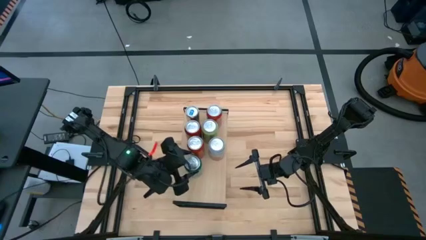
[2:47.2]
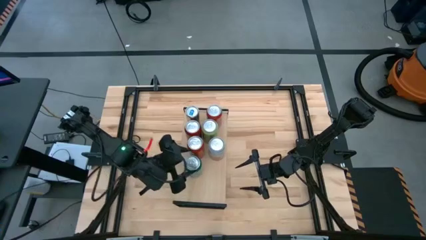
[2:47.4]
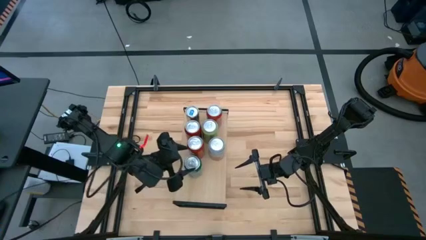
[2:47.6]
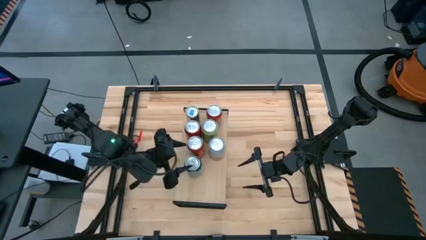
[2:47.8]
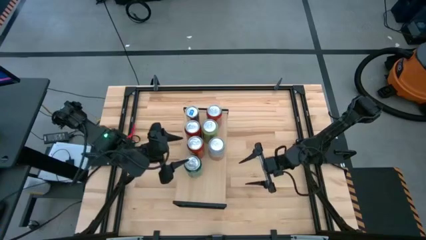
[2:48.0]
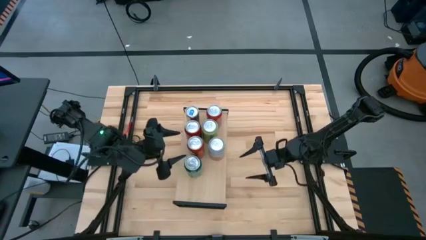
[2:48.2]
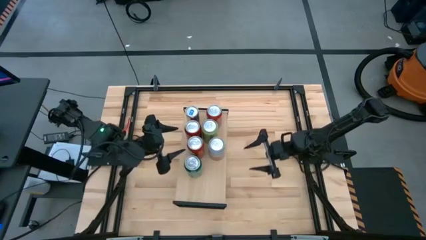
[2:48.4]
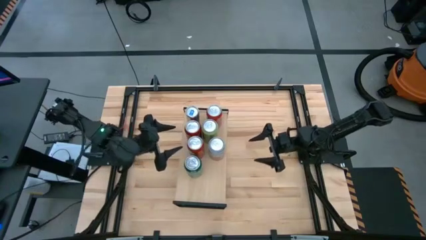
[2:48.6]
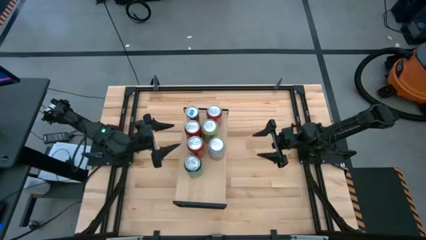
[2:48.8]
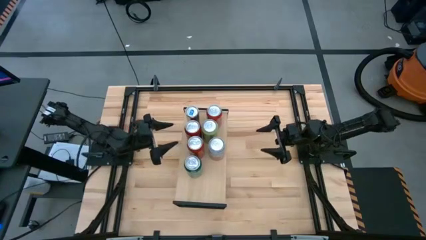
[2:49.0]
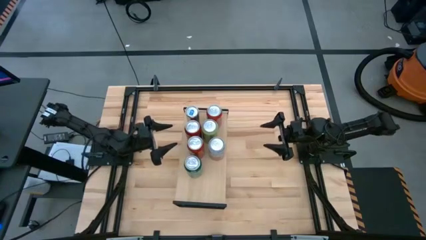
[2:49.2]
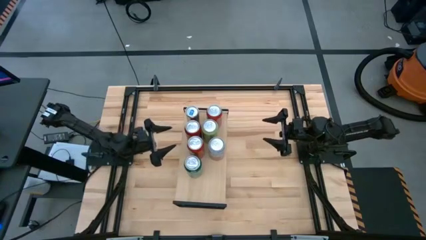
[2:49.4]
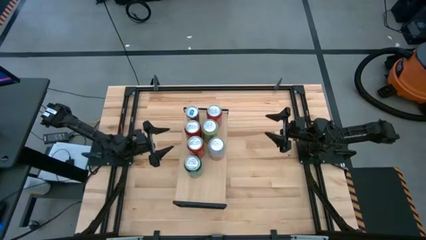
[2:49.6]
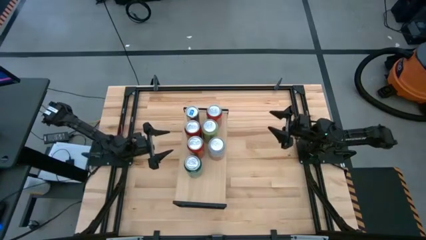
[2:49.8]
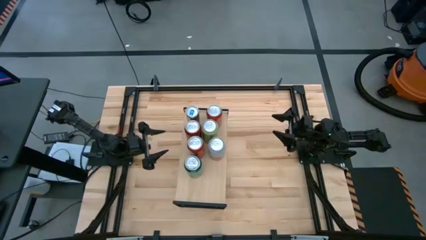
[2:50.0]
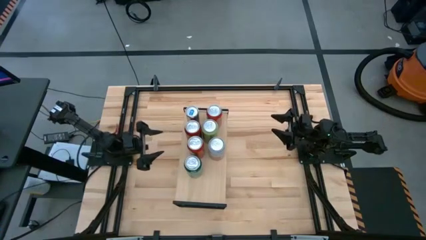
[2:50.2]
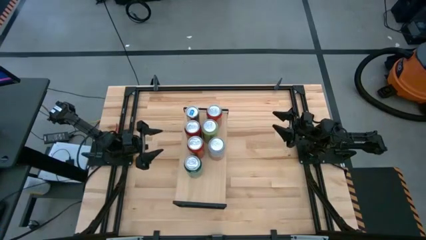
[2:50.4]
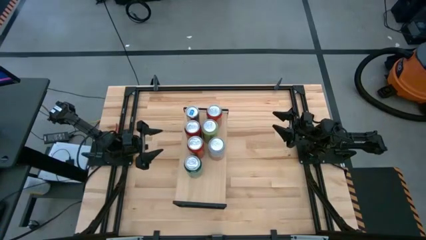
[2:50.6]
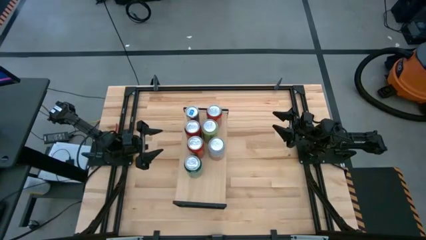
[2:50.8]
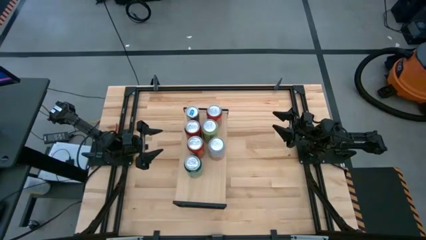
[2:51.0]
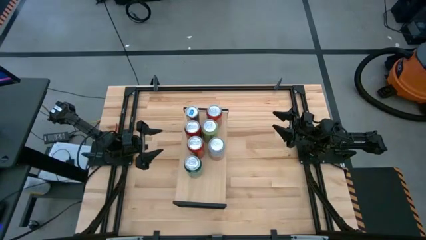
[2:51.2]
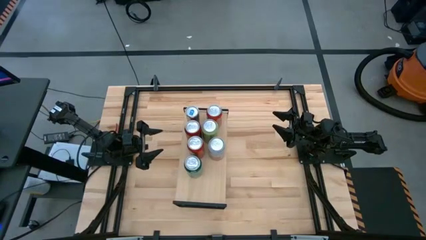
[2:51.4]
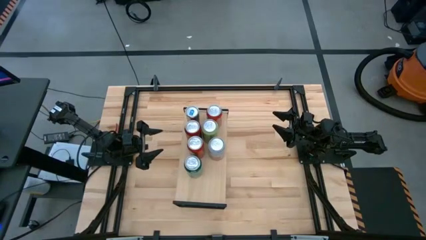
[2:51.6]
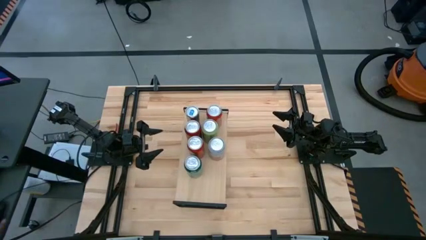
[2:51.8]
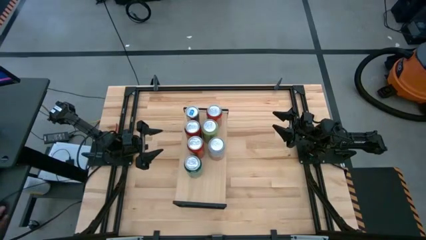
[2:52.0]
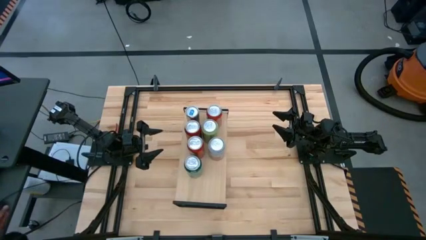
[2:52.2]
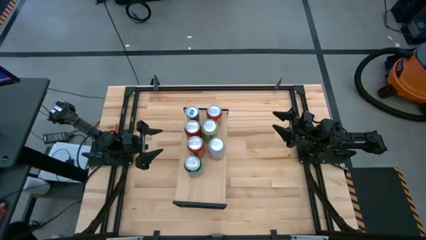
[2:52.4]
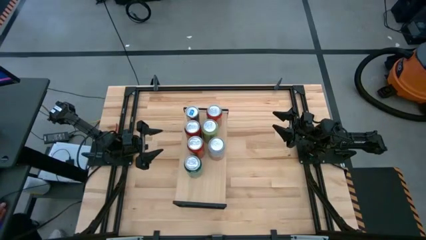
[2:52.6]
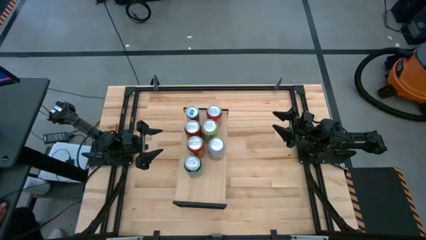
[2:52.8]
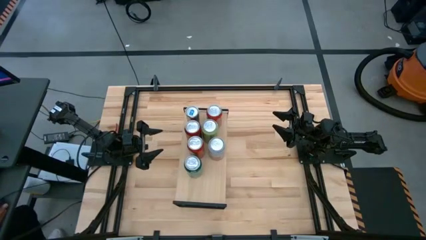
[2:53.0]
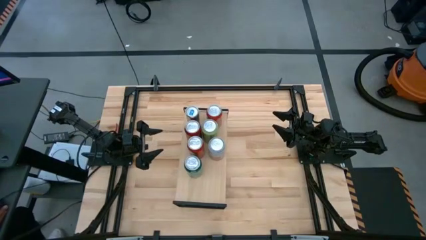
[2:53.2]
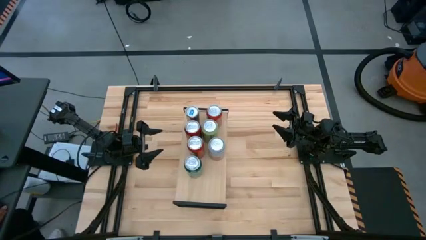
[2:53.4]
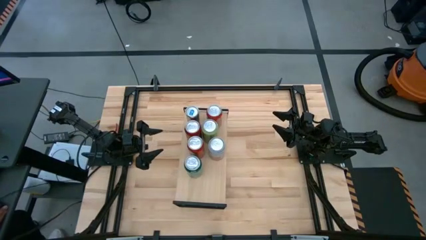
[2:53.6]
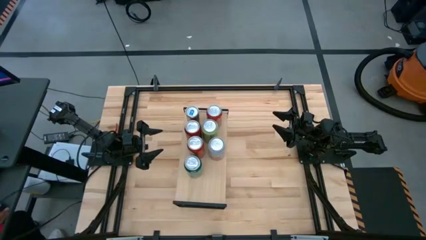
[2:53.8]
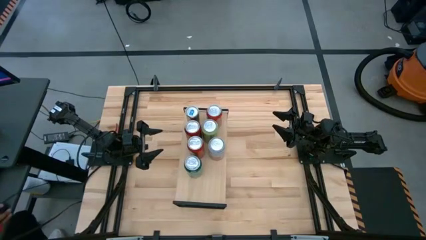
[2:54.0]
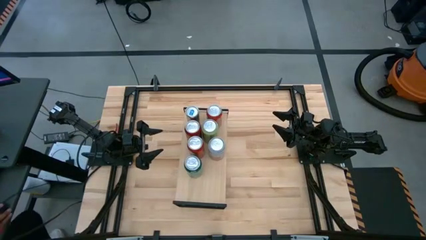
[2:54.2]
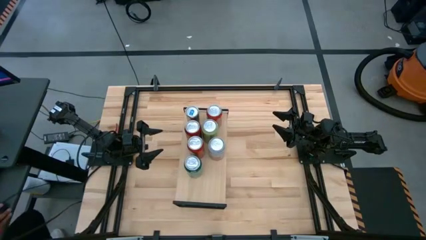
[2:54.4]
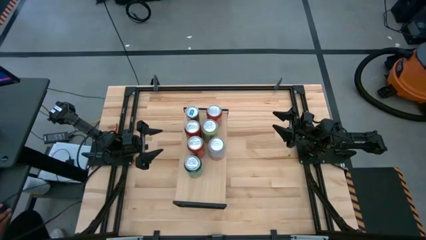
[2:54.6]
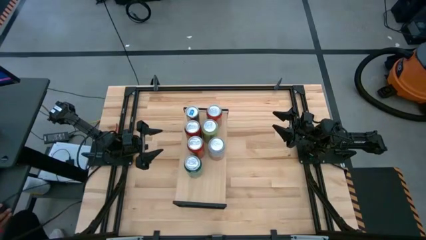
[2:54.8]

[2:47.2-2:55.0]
Task: Place canned beverage on shelf
Return to Home Position
